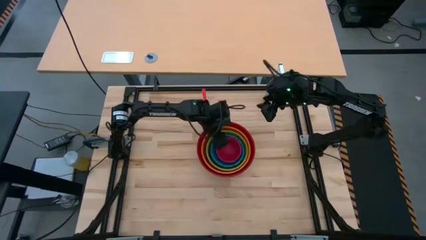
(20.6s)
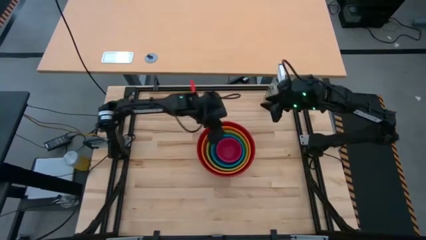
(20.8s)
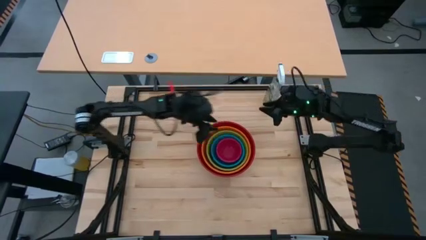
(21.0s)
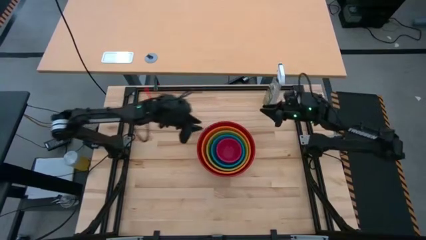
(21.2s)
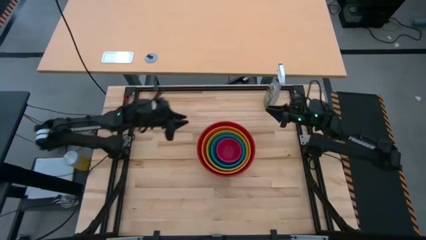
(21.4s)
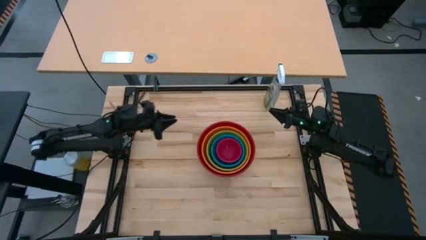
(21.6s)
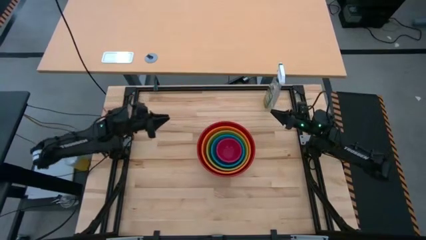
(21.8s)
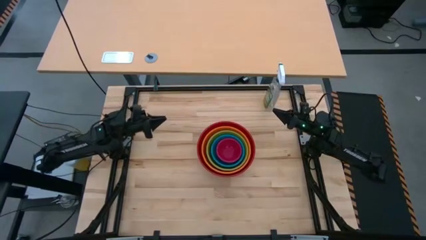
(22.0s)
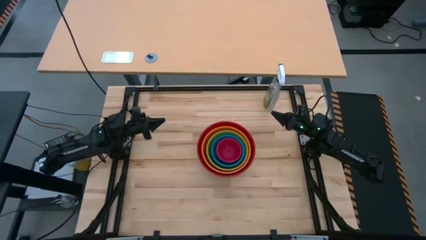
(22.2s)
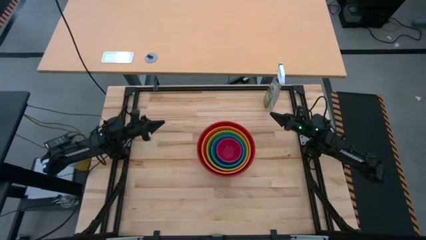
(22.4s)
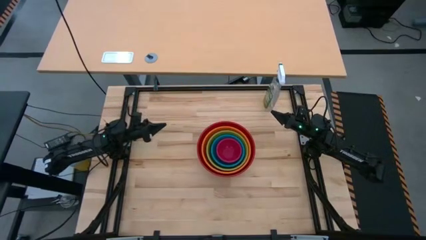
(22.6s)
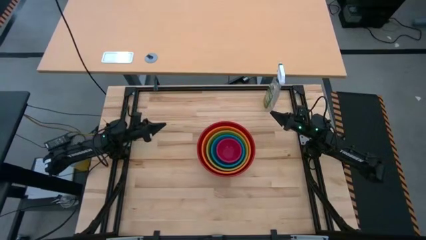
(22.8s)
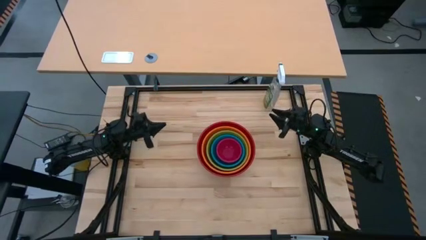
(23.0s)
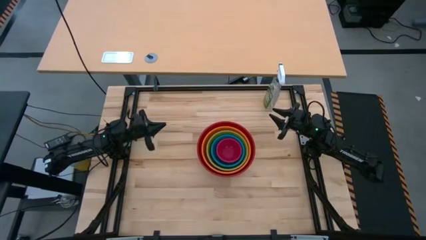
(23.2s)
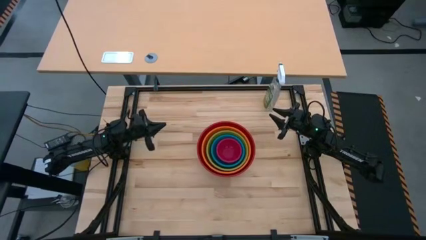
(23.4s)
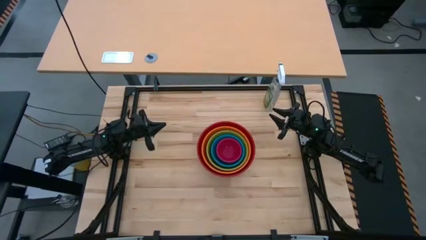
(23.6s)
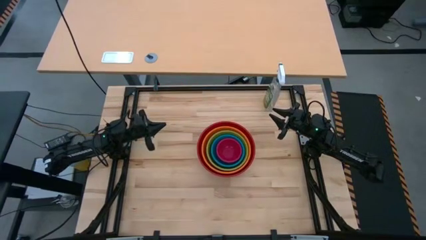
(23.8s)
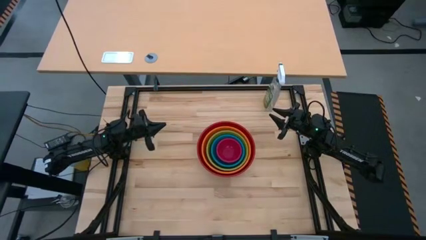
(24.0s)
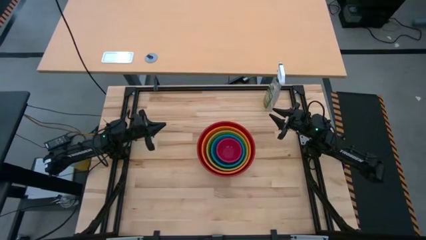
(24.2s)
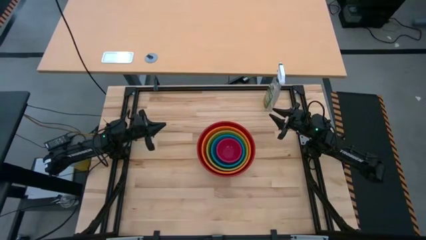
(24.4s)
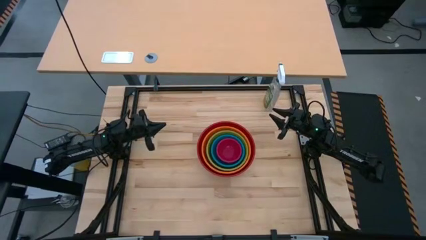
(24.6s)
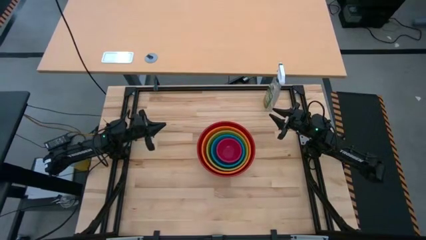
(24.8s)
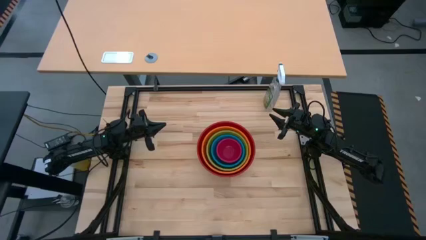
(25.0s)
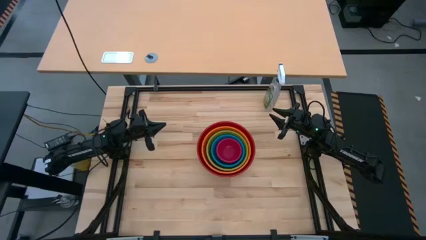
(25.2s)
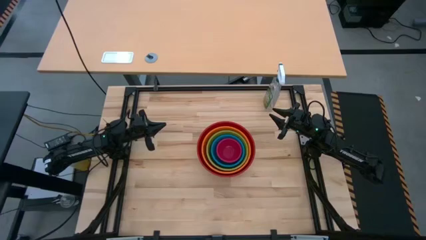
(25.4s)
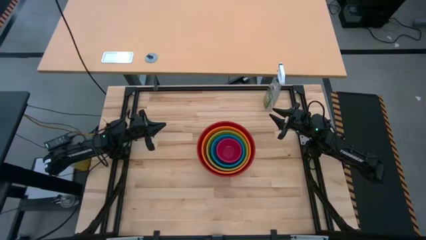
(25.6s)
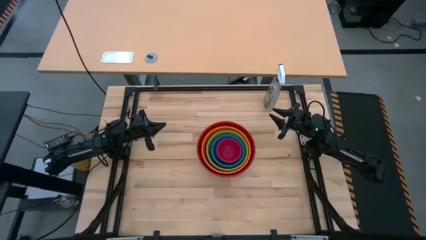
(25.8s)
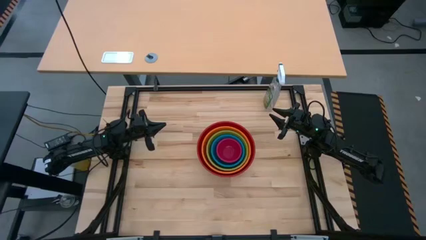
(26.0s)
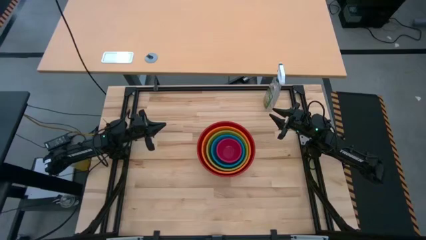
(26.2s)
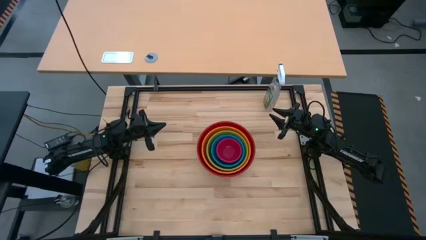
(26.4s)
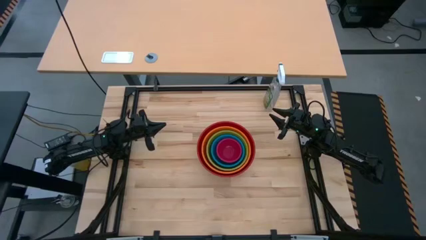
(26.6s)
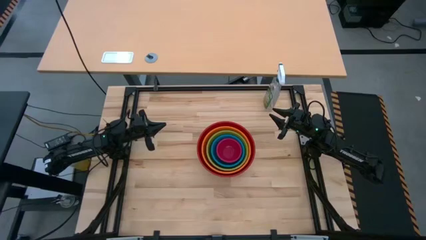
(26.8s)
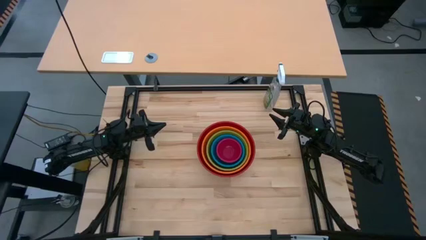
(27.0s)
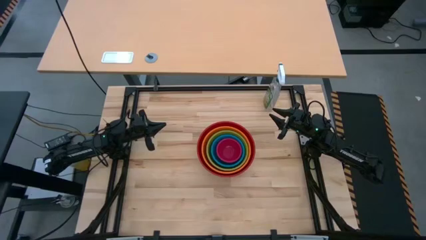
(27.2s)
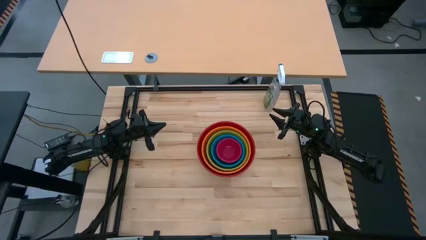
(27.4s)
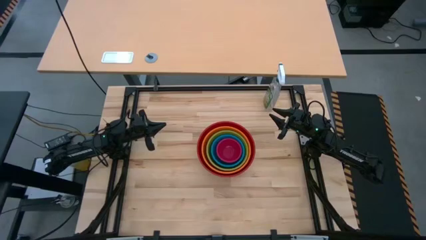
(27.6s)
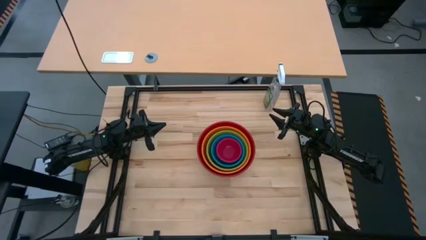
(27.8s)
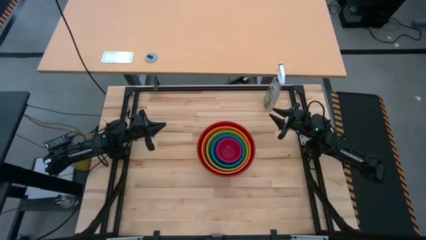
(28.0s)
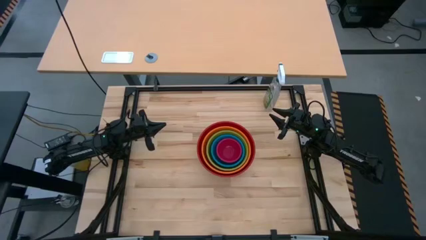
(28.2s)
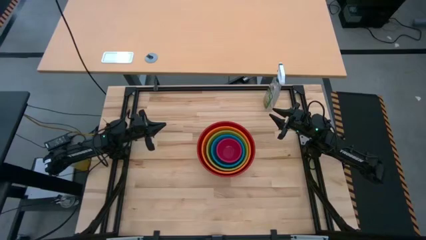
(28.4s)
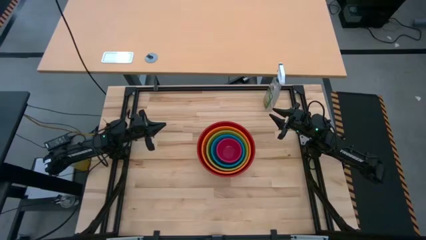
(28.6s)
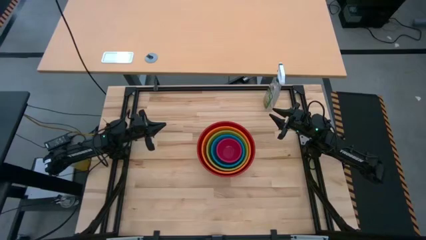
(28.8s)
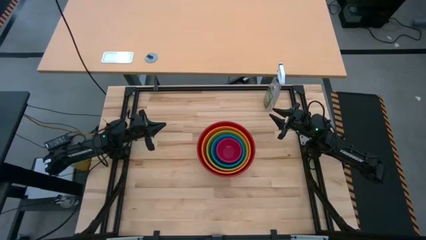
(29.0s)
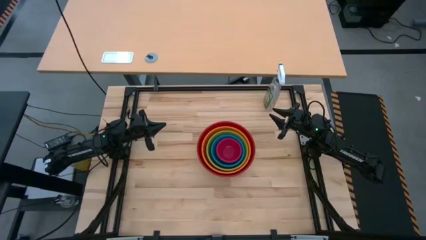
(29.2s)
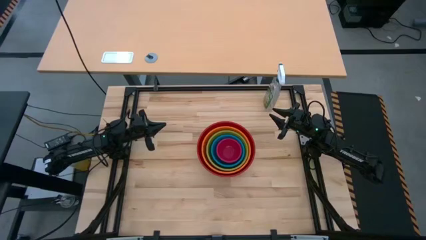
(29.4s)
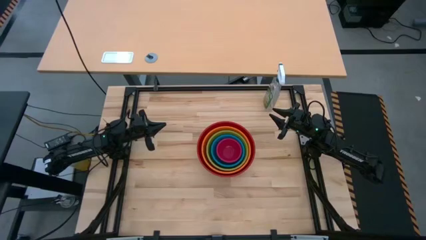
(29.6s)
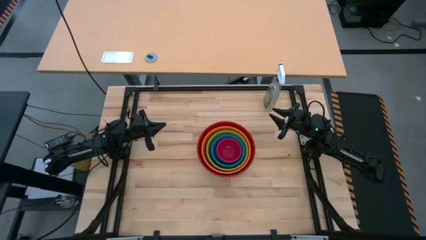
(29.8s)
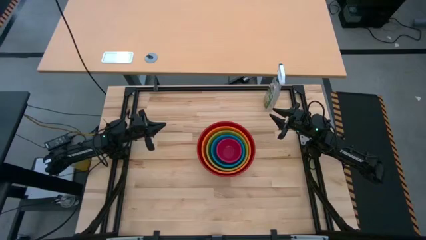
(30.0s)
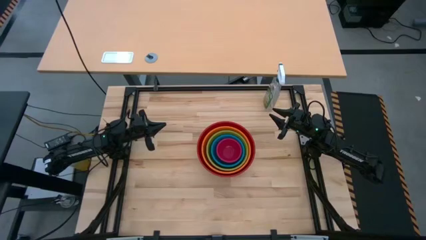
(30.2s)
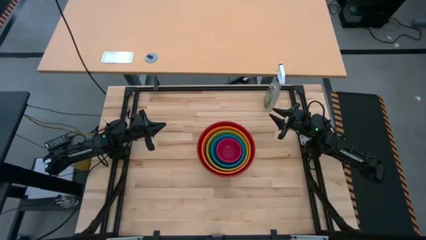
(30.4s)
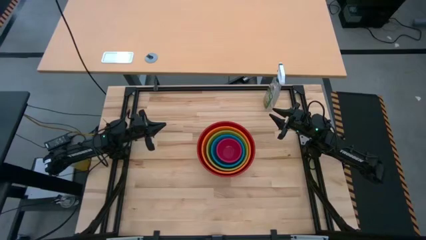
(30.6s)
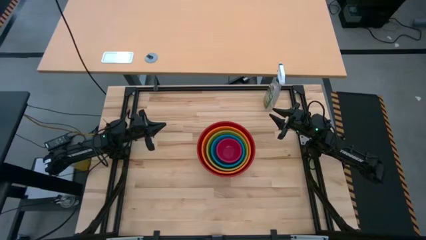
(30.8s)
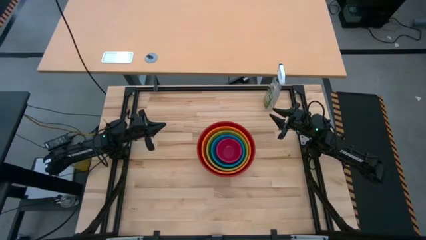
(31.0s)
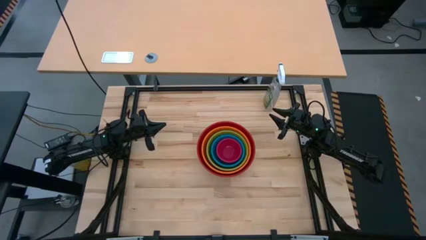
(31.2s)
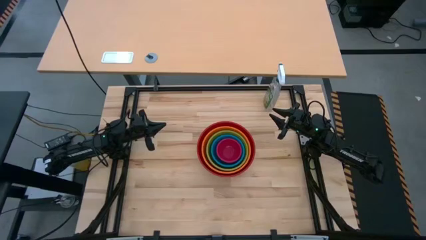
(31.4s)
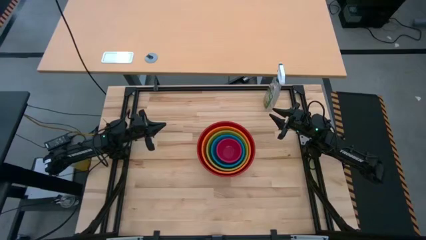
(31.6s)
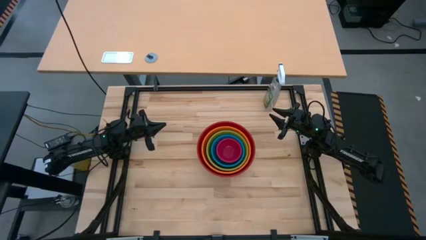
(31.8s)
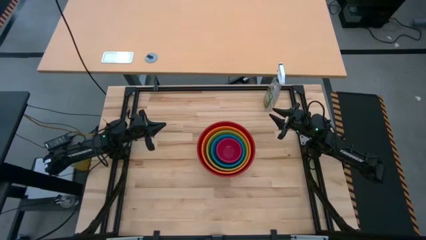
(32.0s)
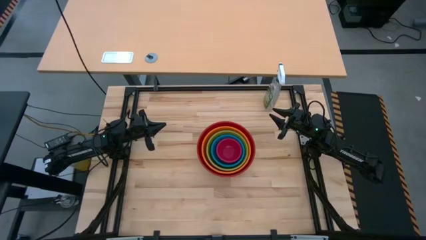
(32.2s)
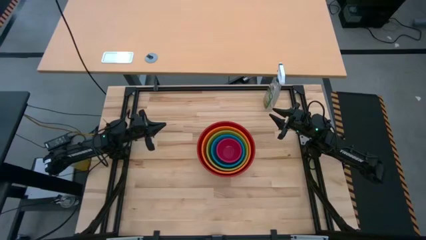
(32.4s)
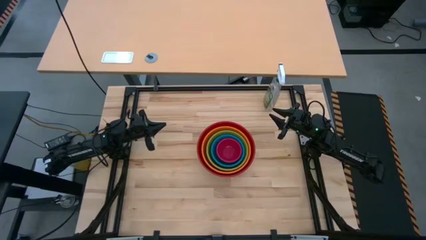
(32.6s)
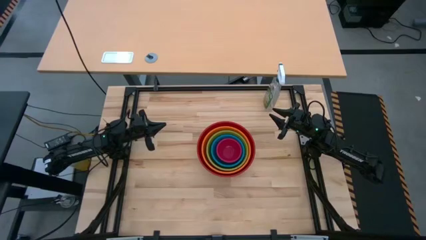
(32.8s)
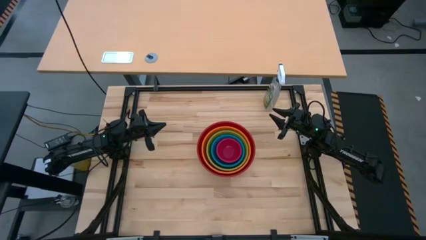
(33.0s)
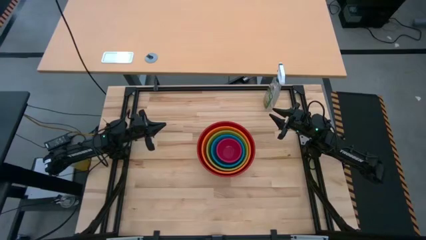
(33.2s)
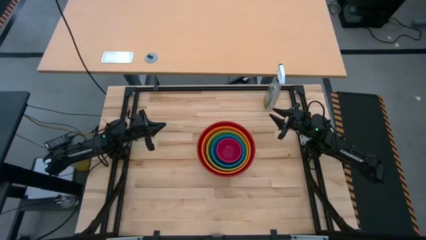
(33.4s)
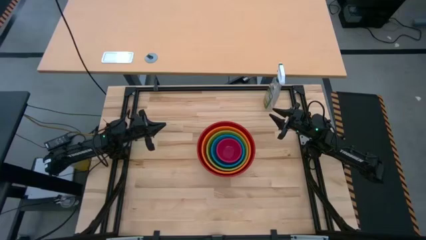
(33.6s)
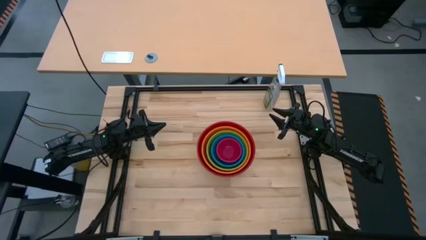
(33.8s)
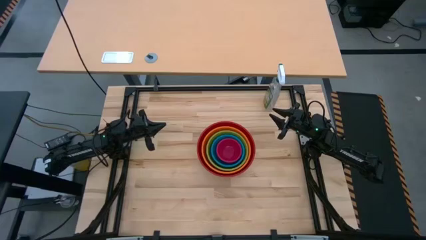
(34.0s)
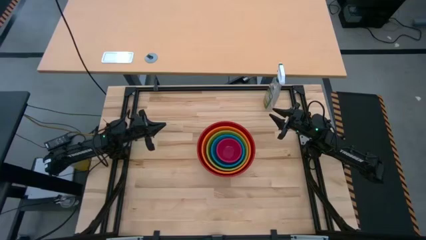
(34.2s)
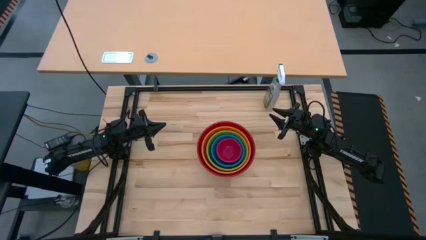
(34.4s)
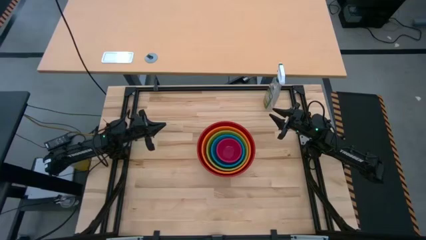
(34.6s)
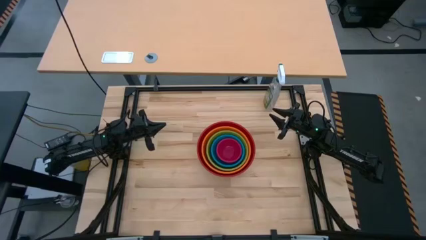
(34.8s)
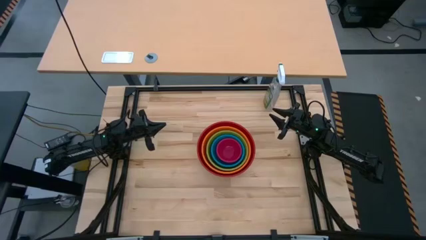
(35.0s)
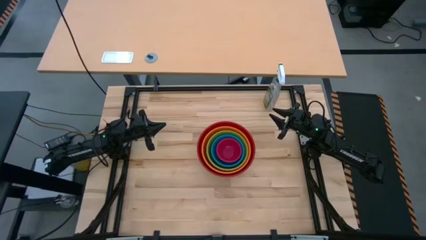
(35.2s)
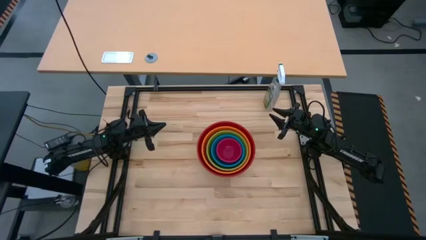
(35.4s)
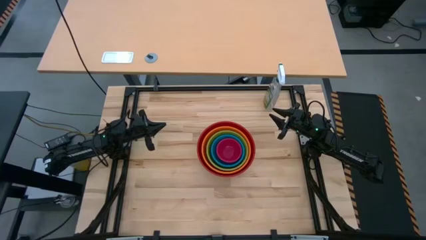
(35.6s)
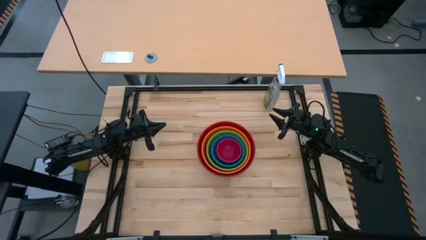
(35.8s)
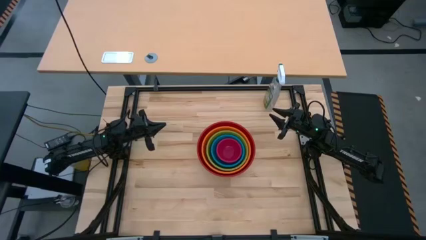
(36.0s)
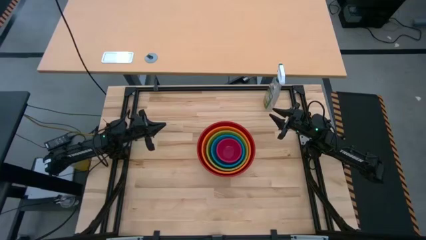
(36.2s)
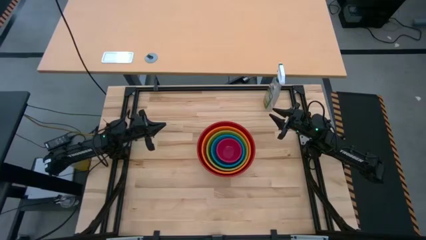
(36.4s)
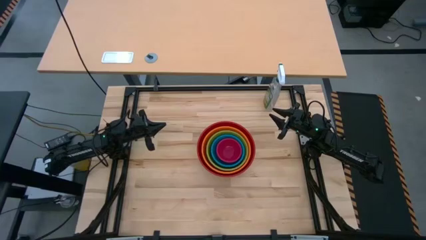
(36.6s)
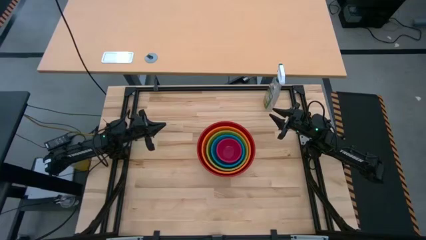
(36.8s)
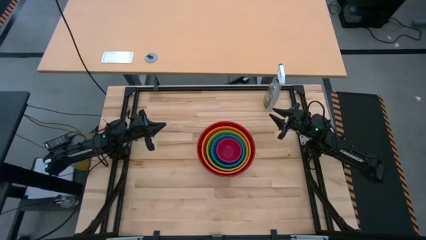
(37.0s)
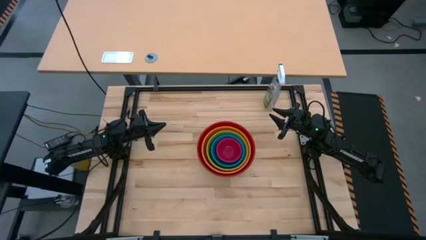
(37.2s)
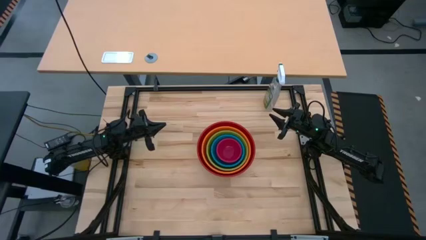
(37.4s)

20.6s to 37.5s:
Return to Home Position
